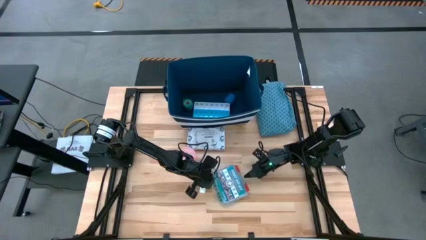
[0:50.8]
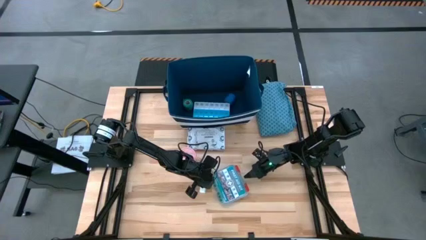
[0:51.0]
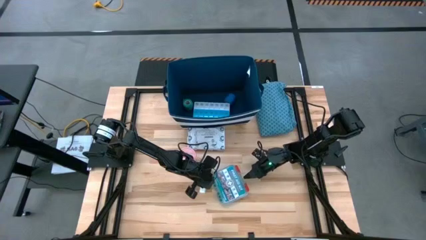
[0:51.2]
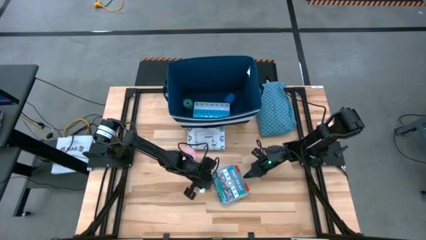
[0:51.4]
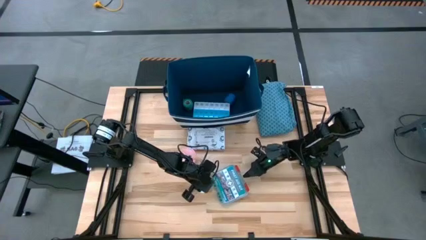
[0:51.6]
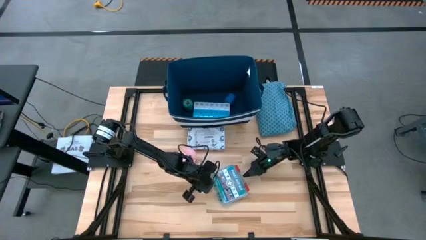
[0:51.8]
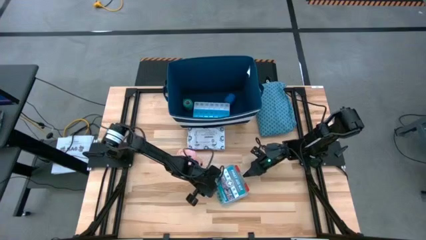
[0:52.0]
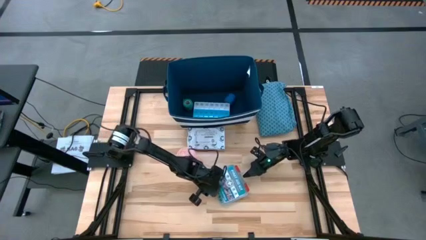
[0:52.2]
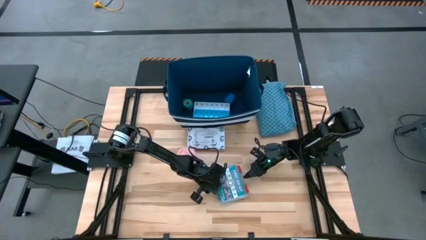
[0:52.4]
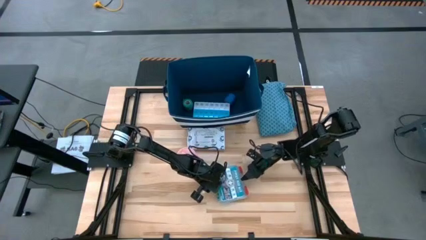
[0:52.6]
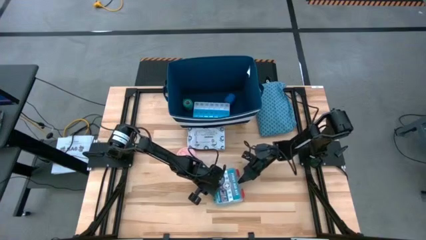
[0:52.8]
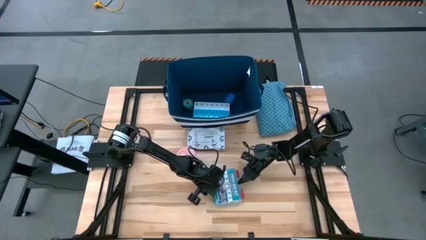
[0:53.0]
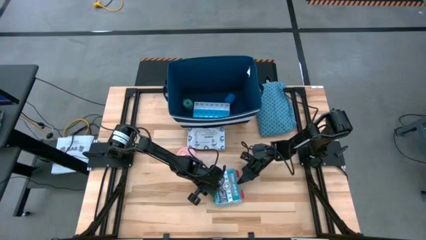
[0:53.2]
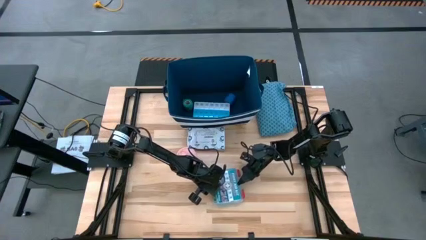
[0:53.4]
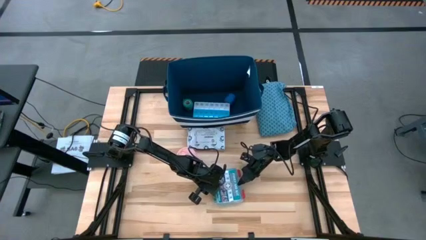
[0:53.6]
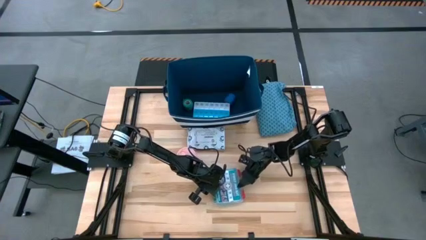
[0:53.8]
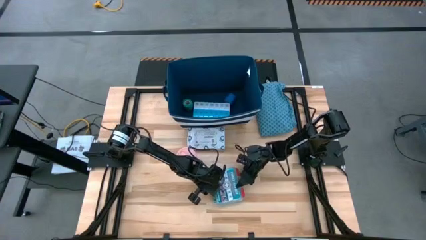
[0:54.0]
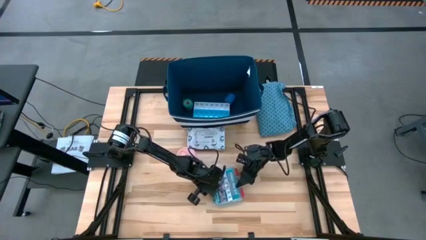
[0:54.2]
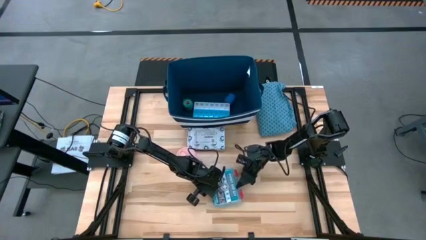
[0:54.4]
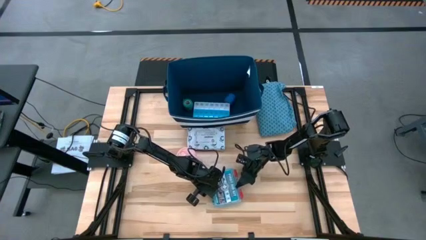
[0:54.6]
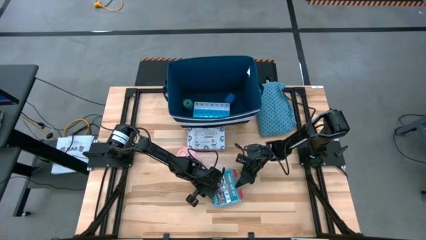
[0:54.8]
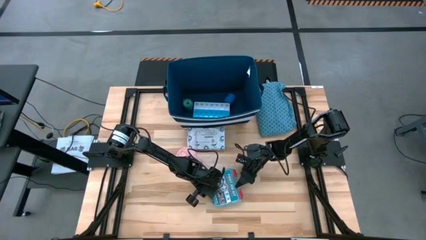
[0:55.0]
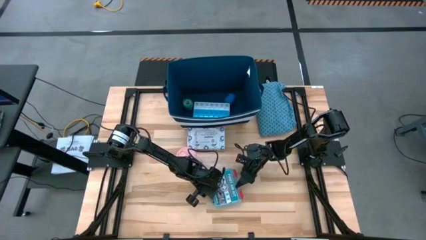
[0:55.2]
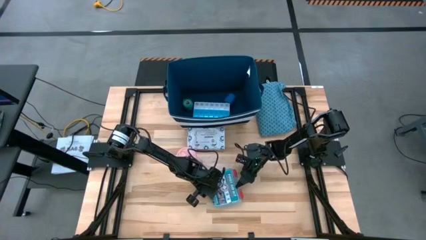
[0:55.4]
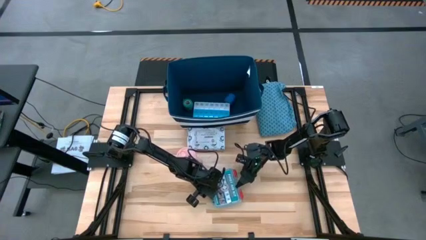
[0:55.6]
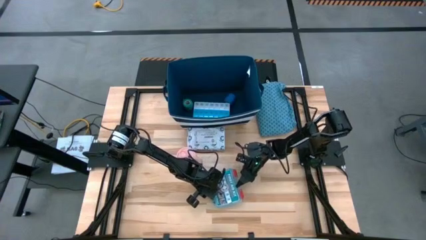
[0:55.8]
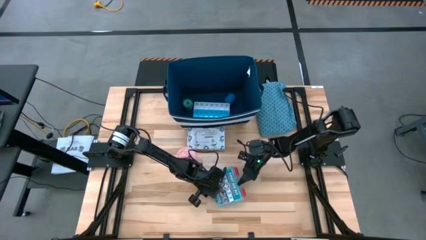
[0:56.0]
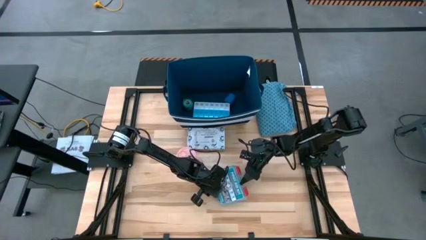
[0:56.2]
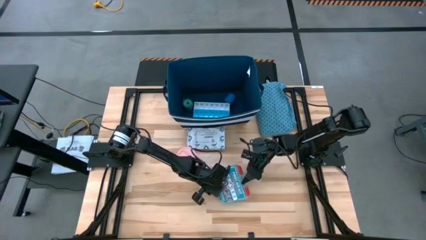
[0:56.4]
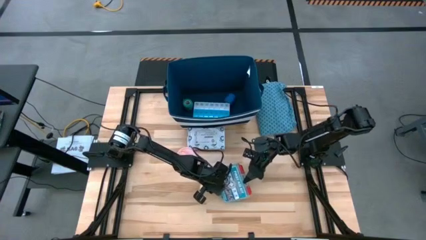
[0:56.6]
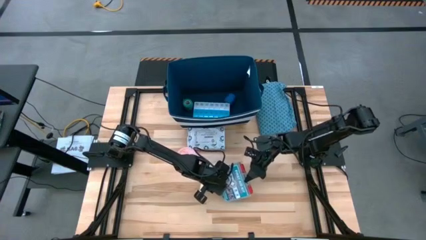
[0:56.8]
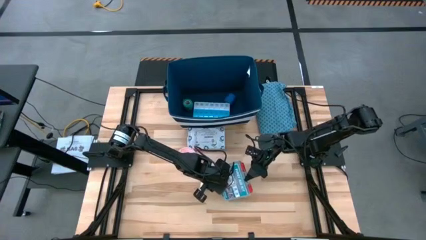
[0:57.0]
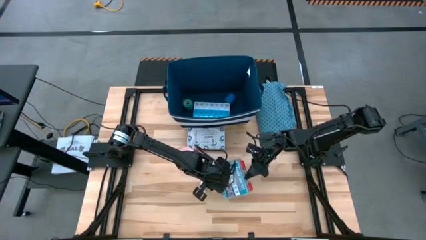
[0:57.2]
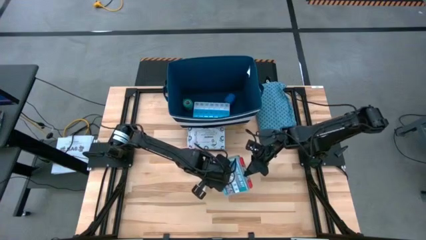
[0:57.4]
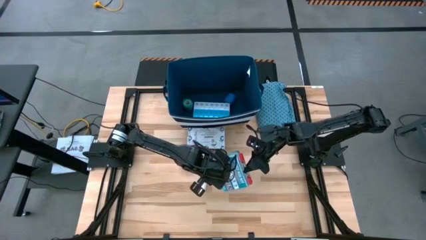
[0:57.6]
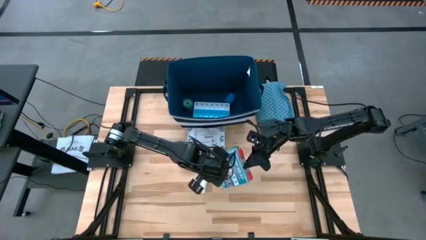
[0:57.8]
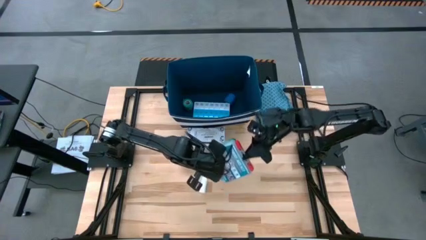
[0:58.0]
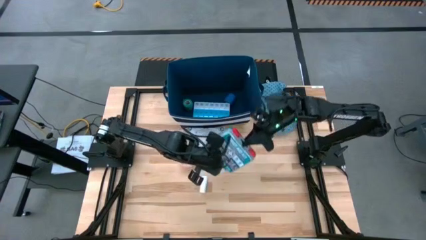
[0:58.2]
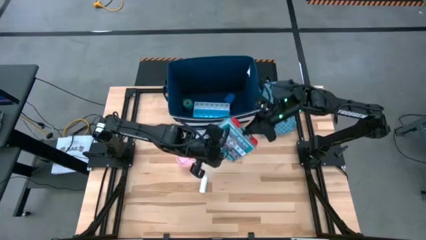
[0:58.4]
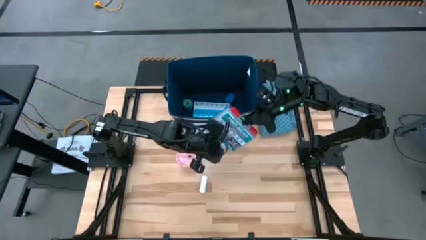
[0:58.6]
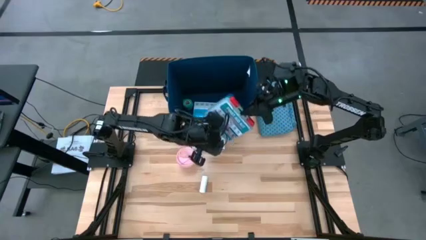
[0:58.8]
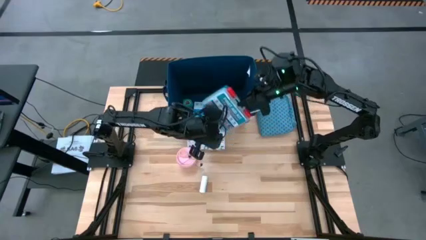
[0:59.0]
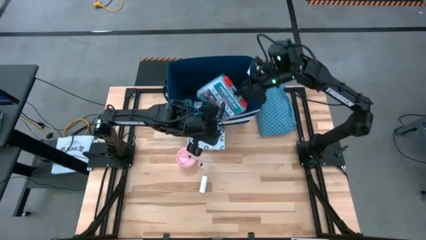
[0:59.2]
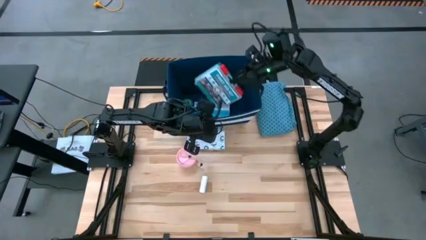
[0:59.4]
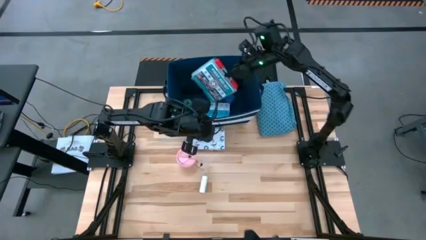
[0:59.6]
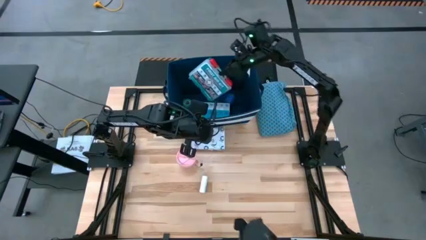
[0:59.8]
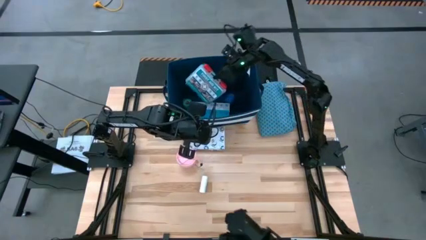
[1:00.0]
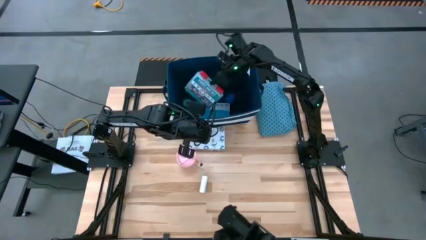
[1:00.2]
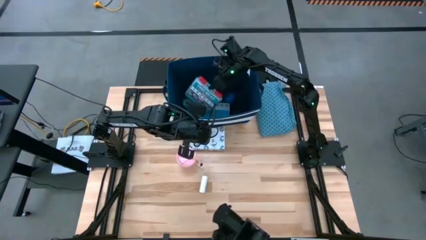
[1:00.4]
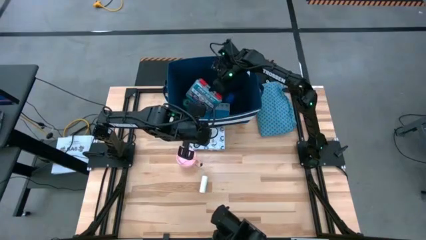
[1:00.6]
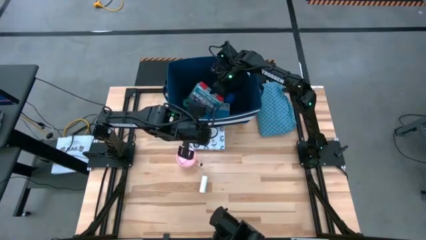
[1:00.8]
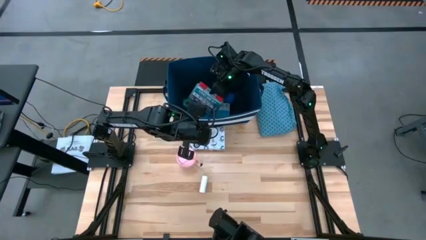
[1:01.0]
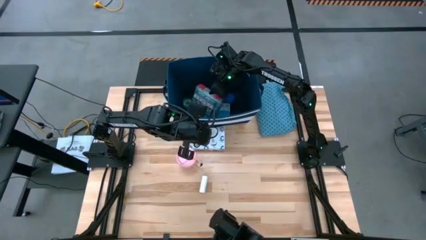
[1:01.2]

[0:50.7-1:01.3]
Task: Pick & place medical supplies in basket/bin
Put the first aid kit into the blue bin

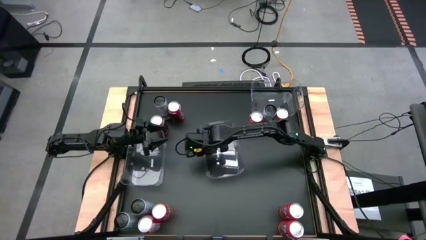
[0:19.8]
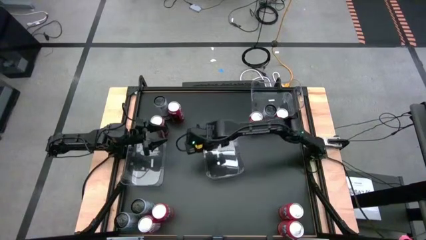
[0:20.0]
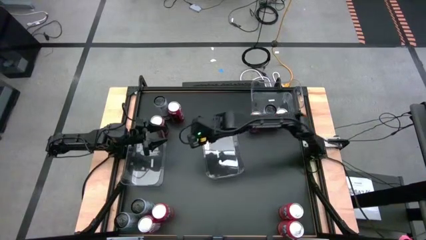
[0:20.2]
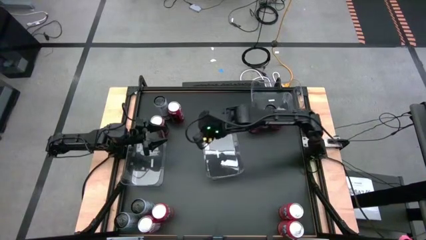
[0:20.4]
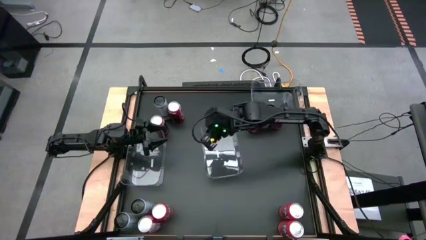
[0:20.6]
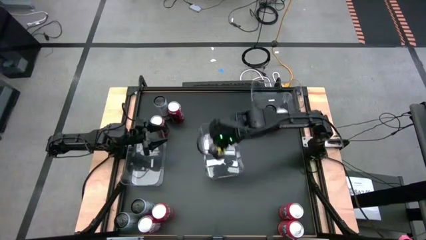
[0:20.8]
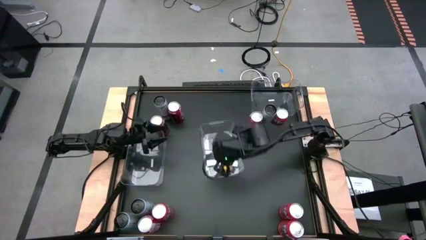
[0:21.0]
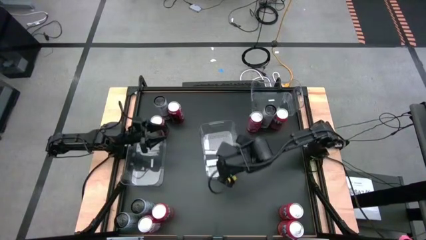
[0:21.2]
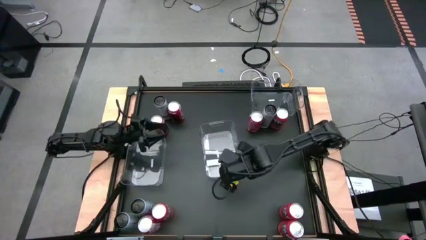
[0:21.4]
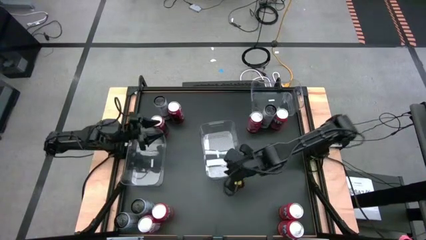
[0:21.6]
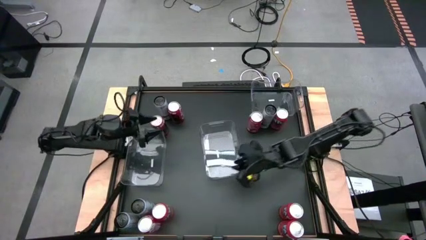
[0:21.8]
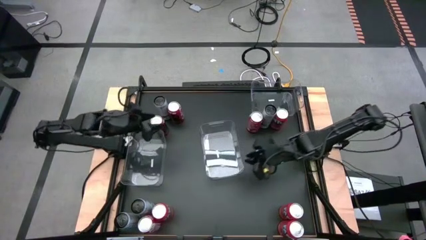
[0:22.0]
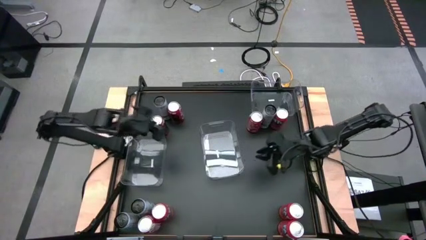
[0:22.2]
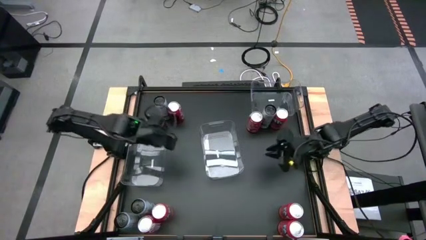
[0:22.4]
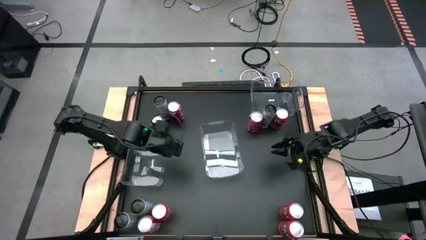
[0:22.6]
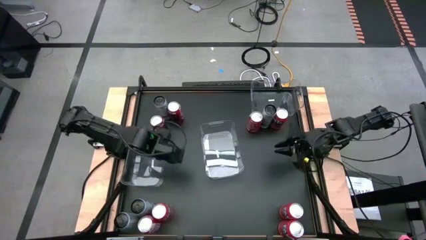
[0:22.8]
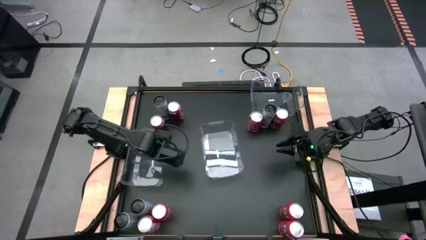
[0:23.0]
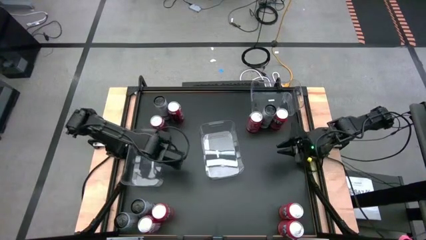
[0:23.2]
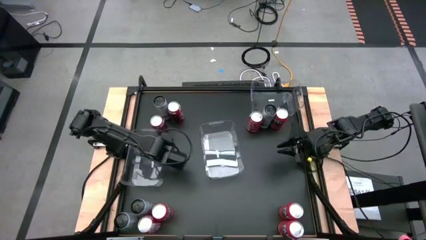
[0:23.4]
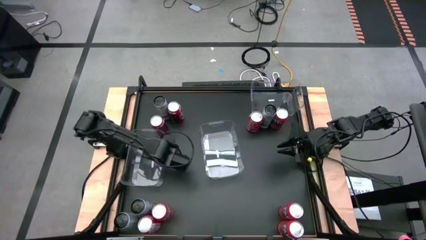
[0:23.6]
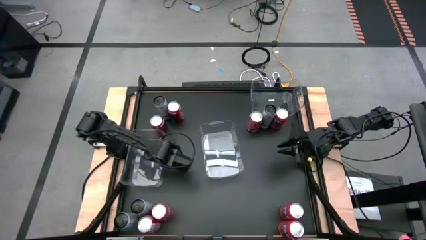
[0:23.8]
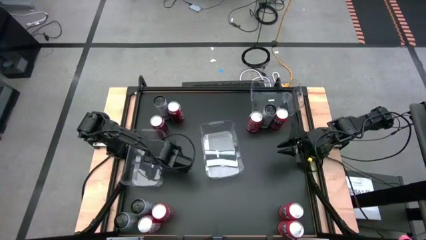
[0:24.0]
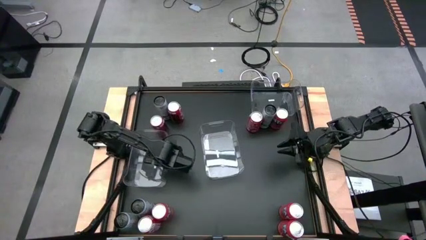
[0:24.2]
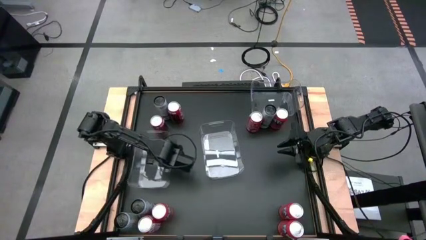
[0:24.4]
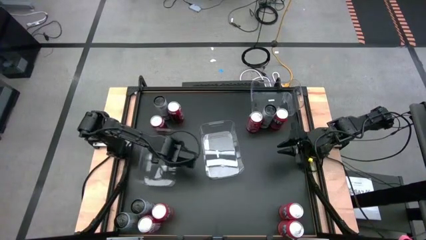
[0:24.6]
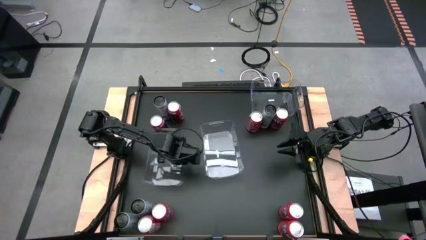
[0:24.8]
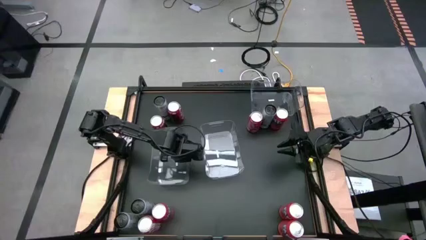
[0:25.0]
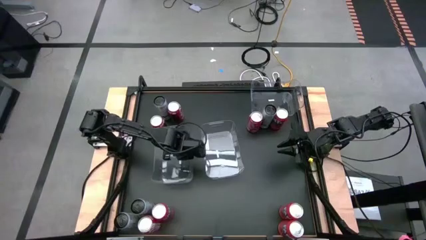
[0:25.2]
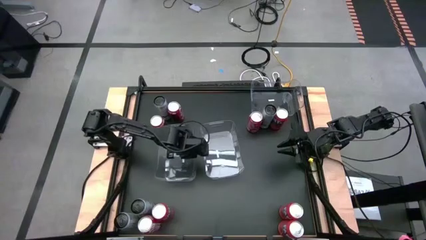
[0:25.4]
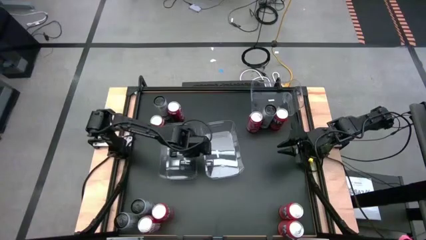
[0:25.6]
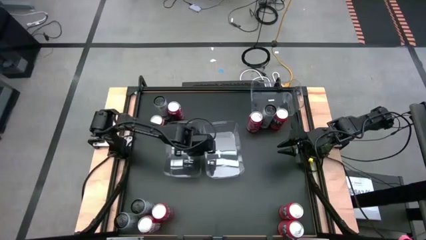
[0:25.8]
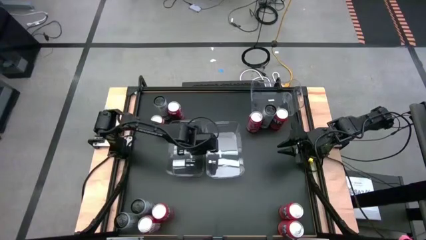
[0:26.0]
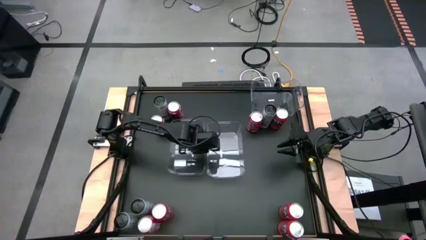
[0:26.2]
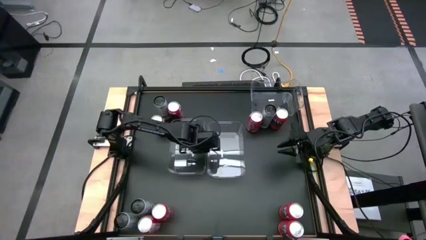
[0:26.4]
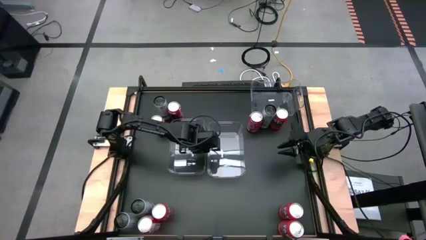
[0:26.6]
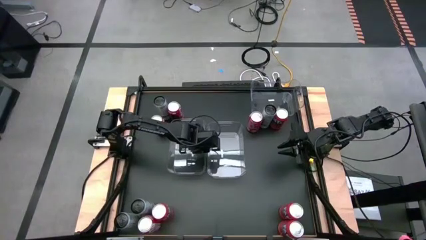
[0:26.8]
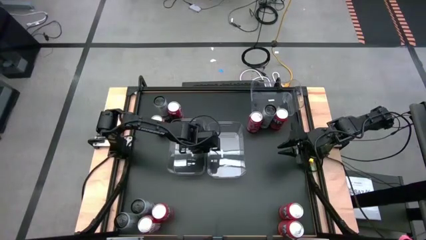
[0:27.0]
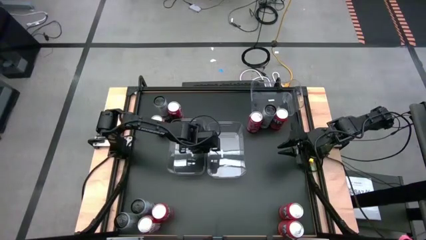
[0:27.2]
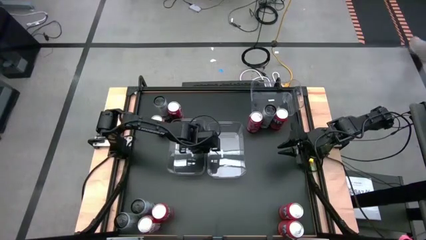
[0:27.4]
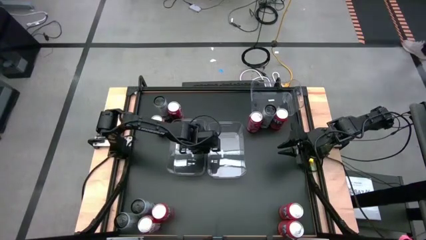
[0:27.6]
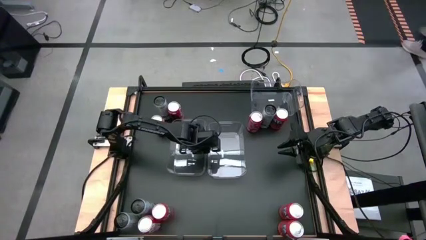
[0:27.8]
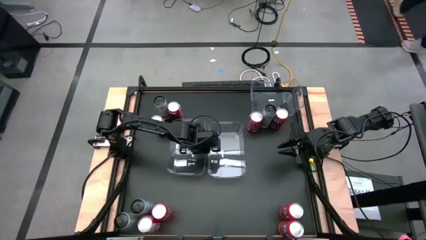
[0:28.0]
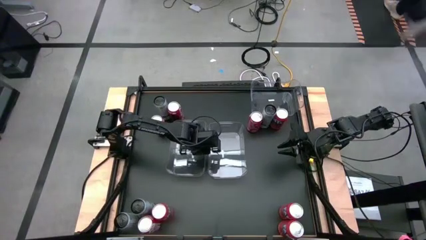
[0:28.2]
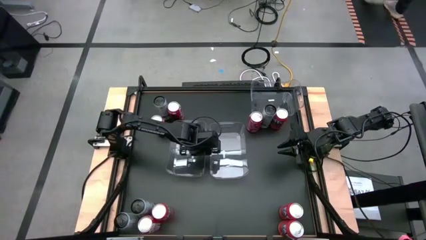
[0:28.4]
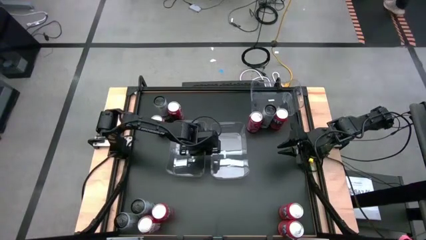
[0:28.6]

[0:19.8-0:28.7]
Task: Sort soda cans
Move the bottom left transparent bin to the left of the bottom right transparent bin
